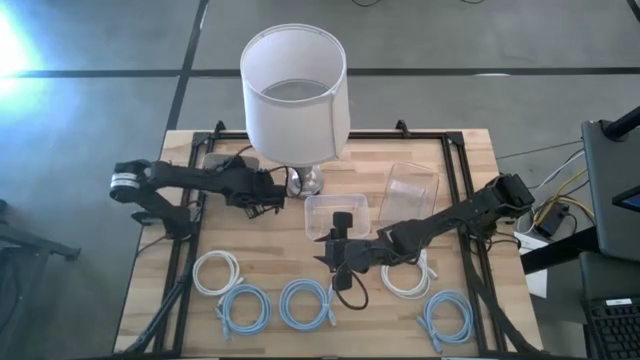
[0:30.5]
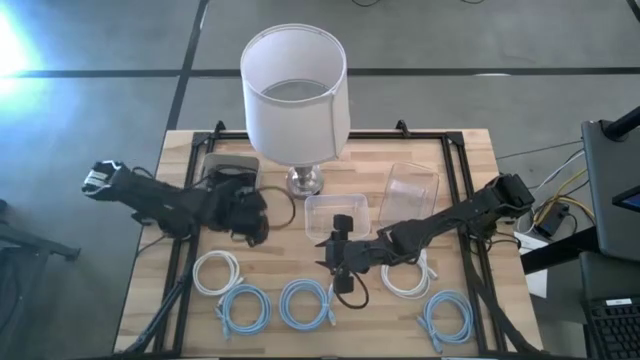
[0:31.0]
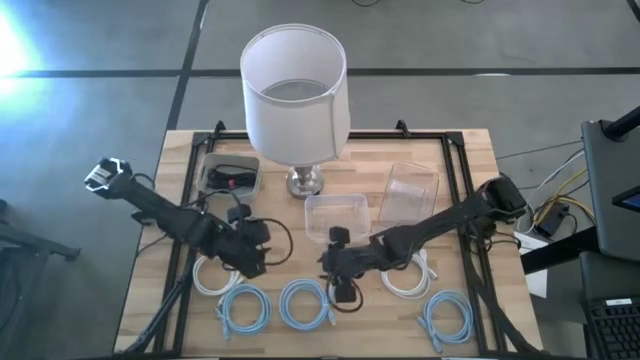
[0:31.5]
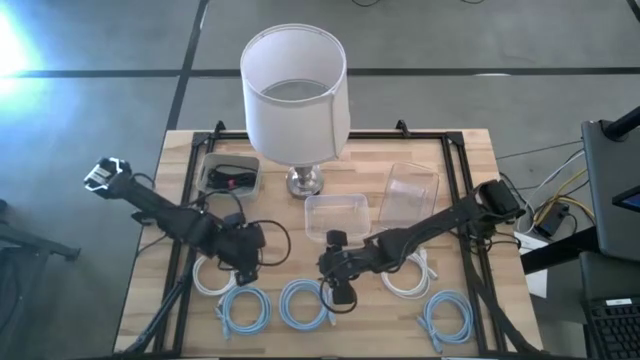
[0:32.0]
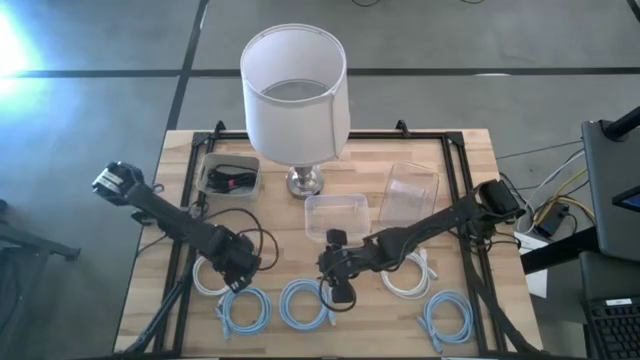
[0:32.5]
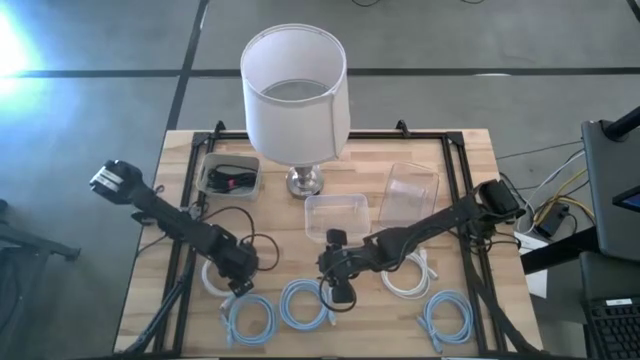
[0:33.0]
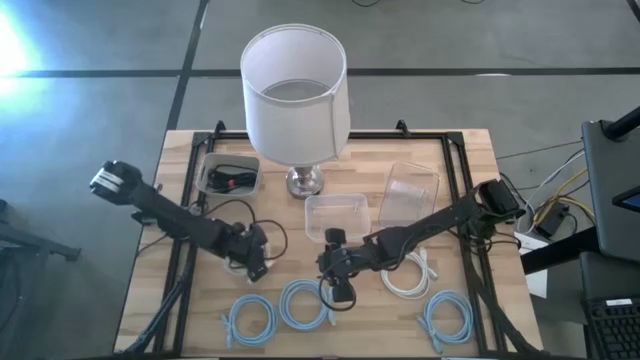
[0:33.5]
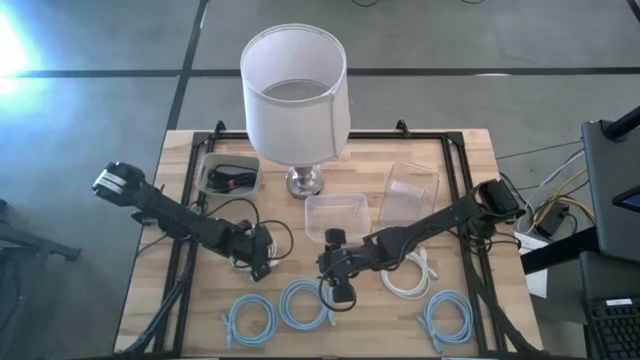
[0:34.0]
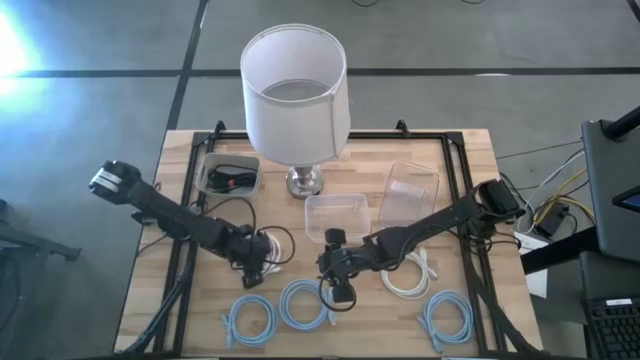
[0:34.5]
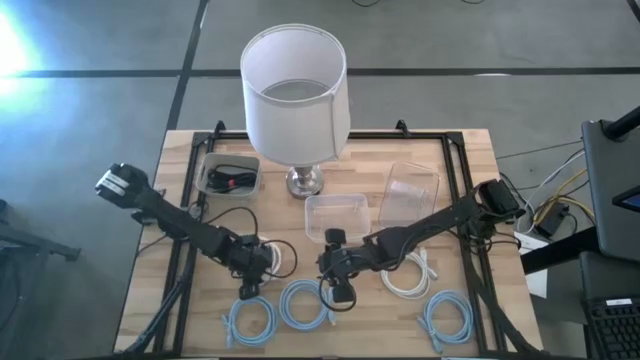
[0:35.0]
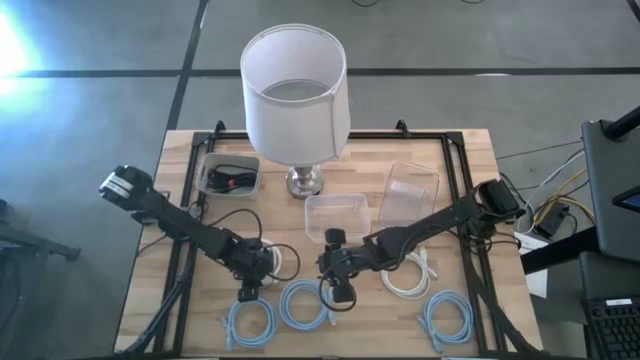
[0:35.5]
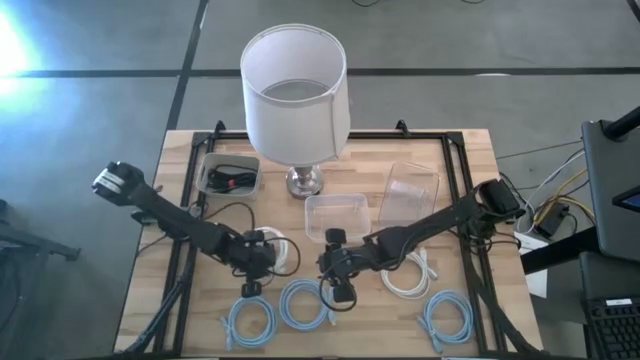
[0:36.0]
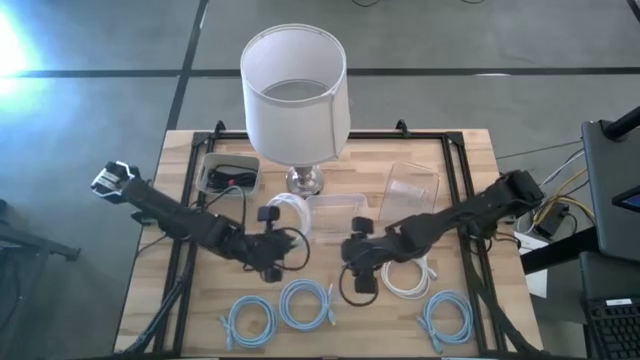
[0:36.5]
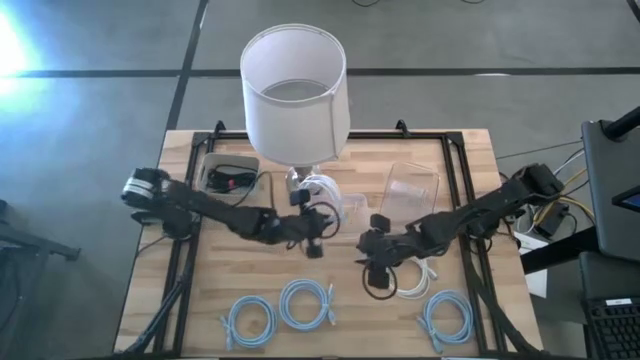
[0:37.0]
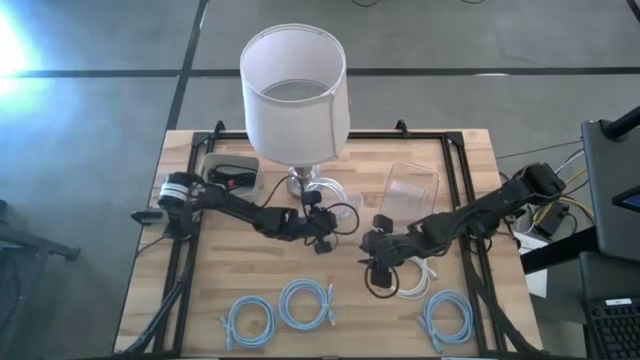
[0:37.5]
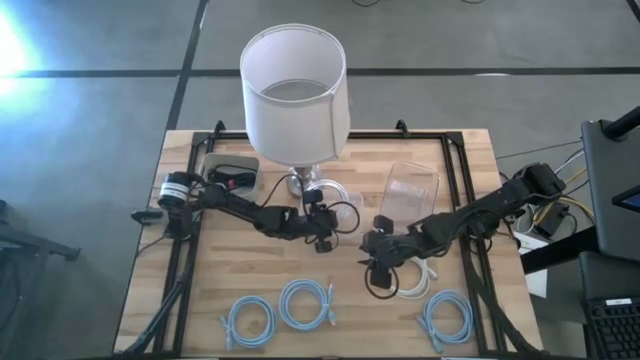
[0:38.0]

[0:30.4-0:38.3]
Task: Pick & Place USB Port
Put the left white USB cable into the left transparent bin

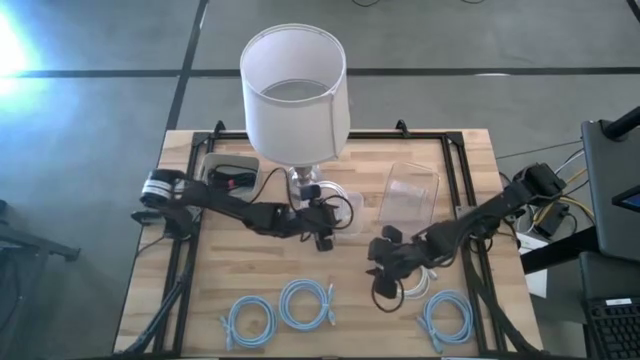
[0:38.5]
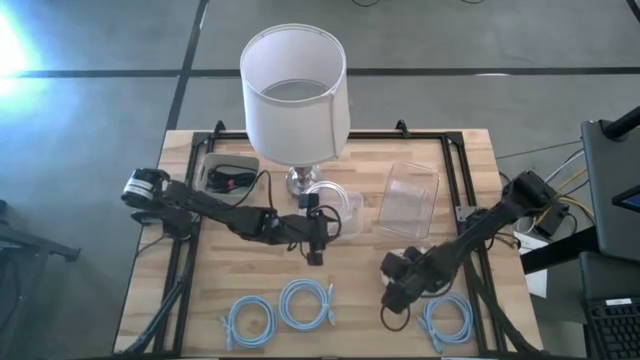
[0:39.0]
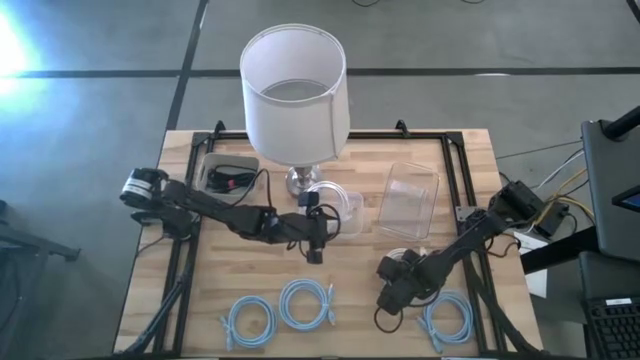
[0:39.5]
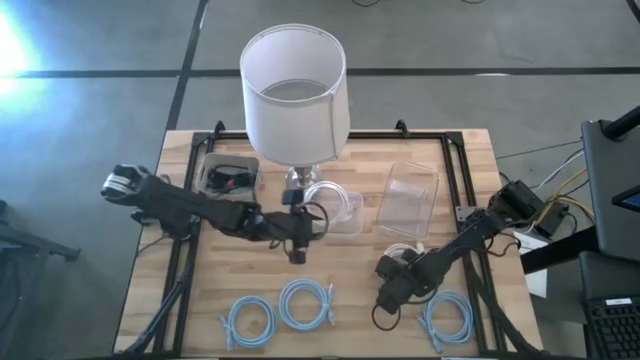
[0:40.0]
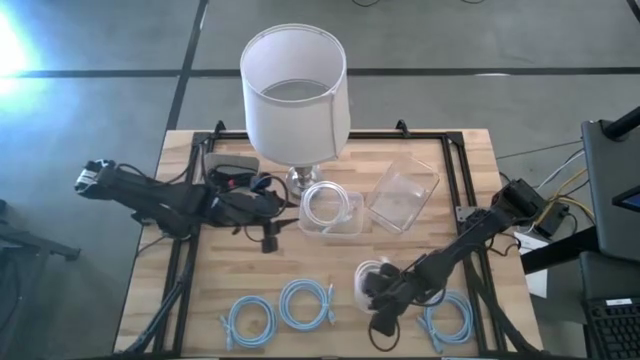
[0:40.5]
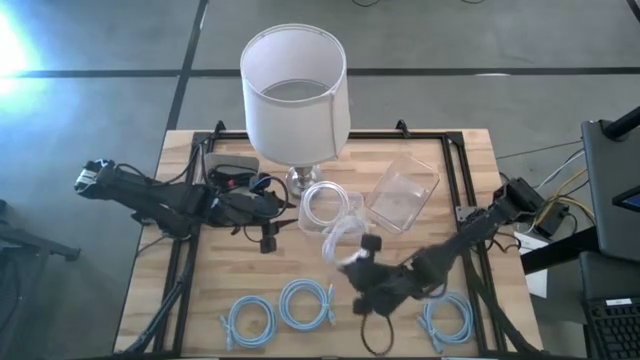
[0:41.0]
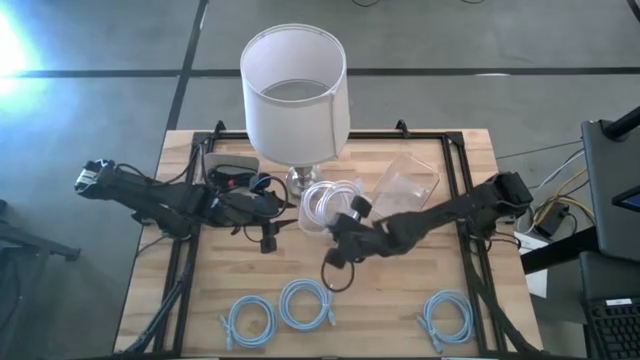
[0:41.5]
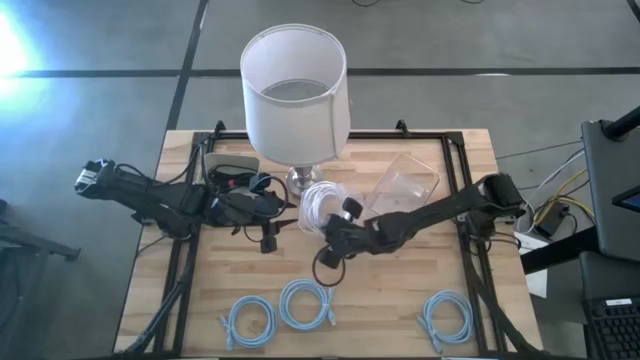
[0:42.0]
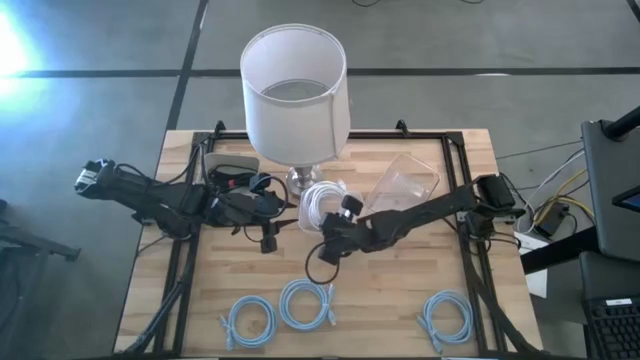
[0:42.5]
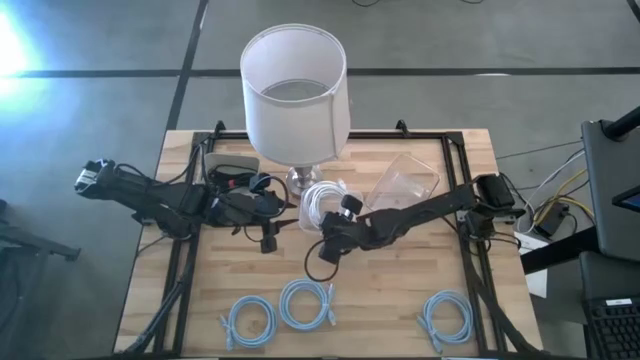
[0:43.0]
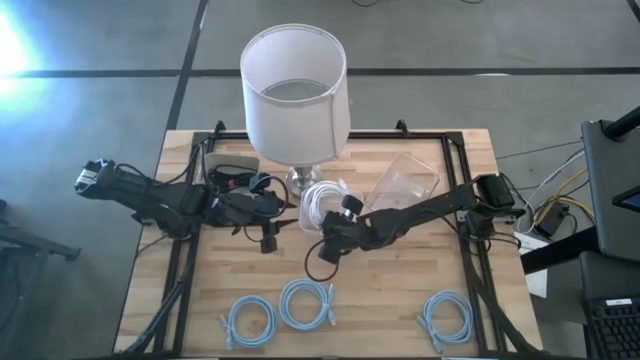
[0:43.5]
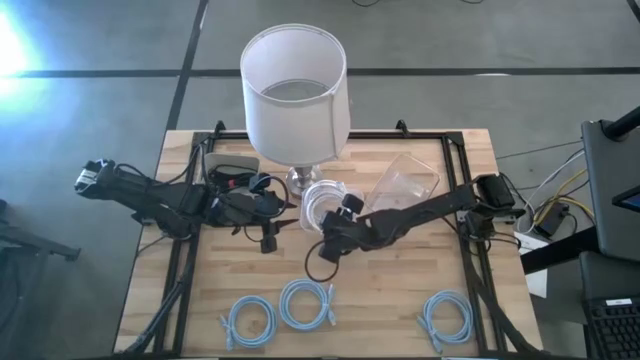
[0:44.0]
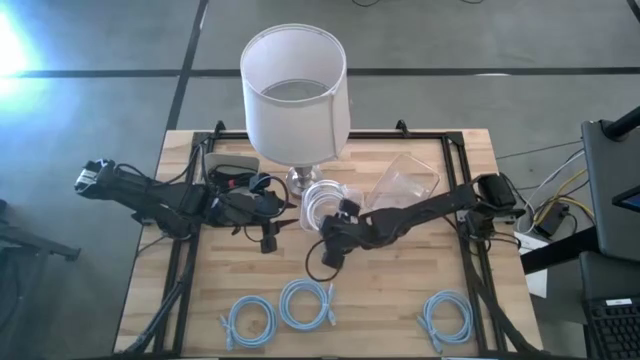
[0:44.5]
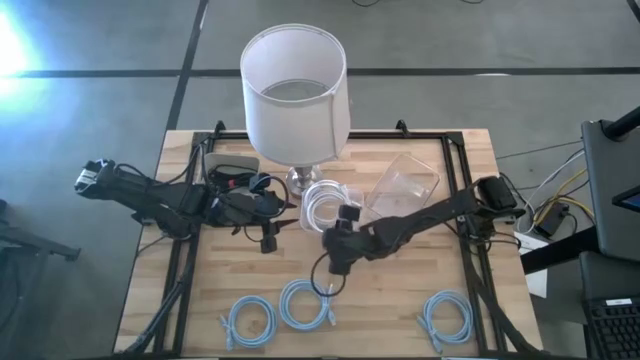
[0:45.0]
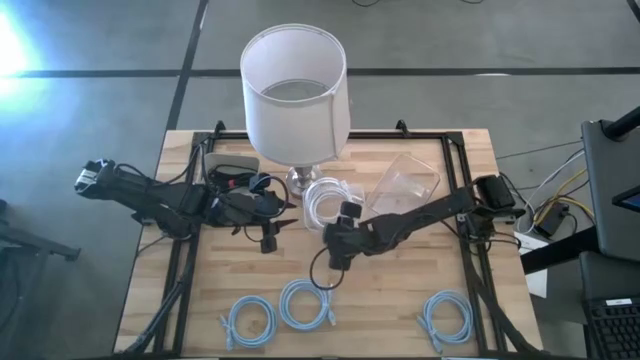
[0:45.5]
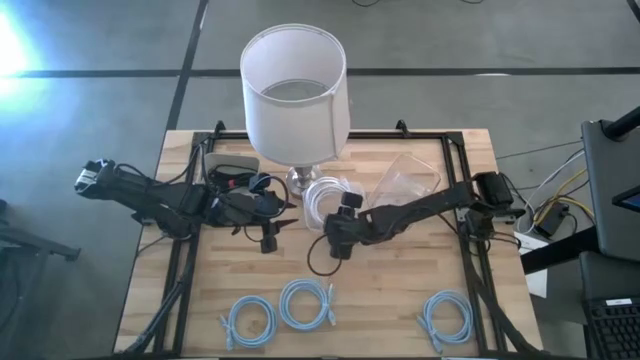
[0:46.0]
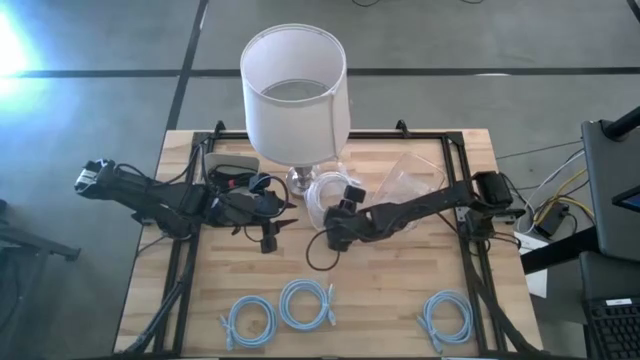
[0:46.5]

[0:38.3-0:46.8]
Put the white USB cable into the left transparent bin

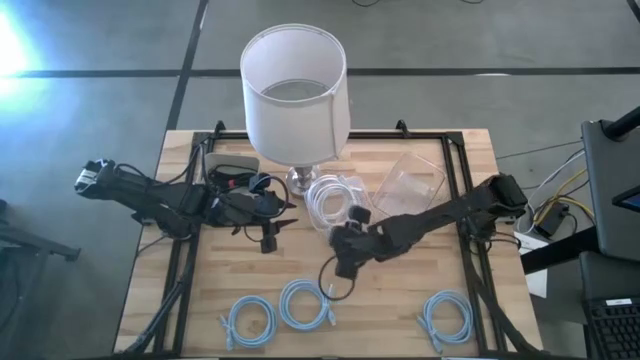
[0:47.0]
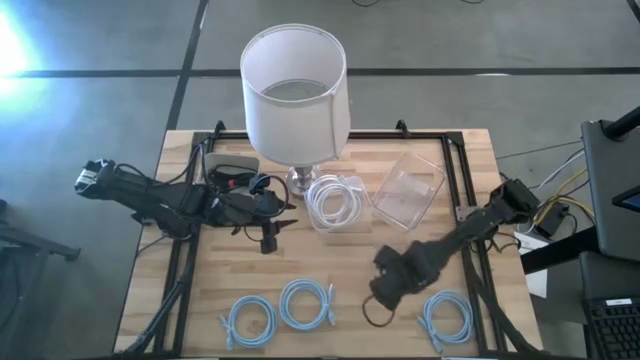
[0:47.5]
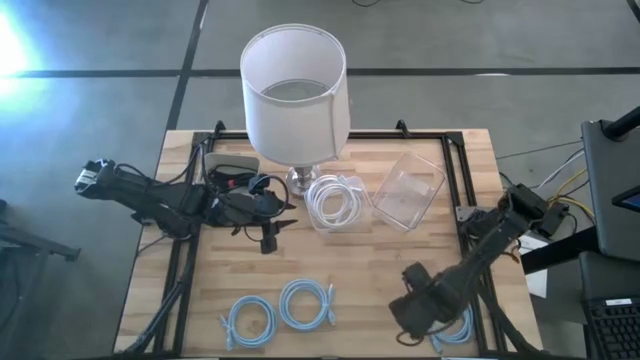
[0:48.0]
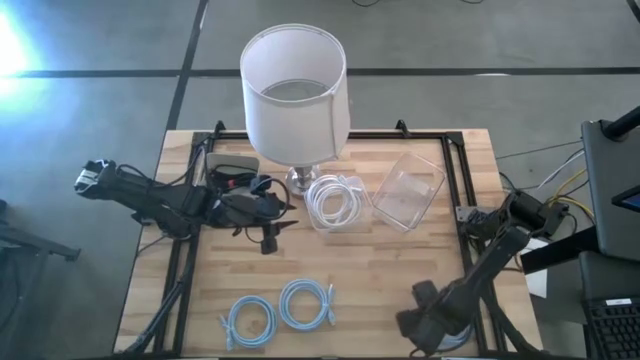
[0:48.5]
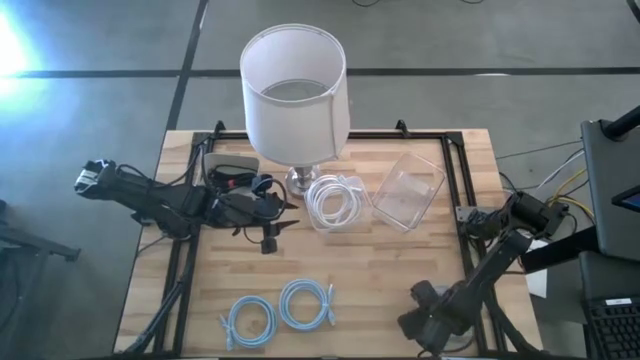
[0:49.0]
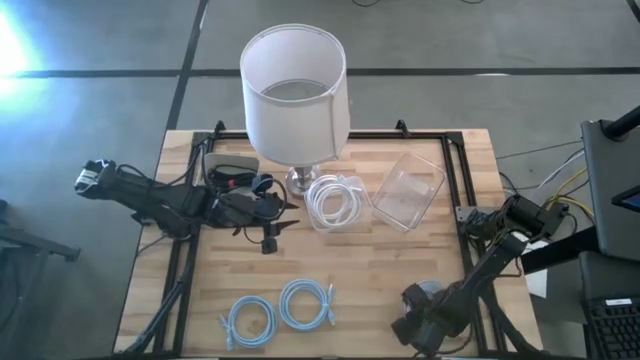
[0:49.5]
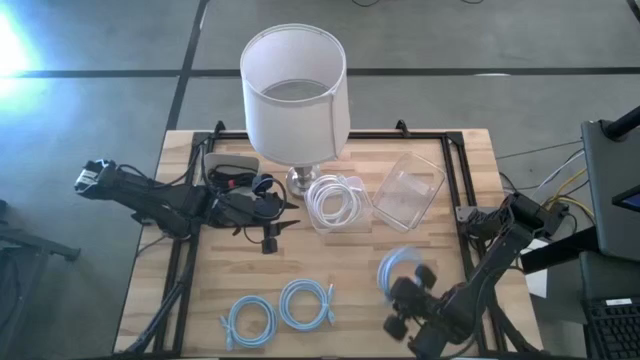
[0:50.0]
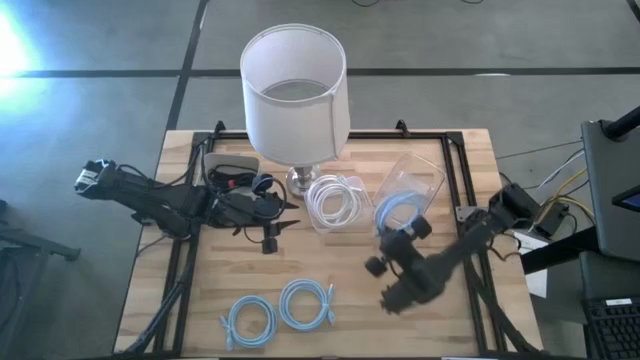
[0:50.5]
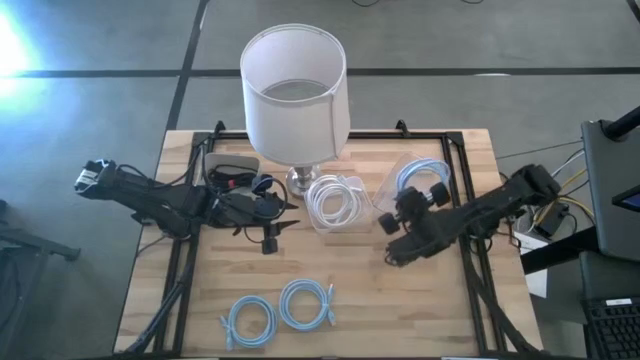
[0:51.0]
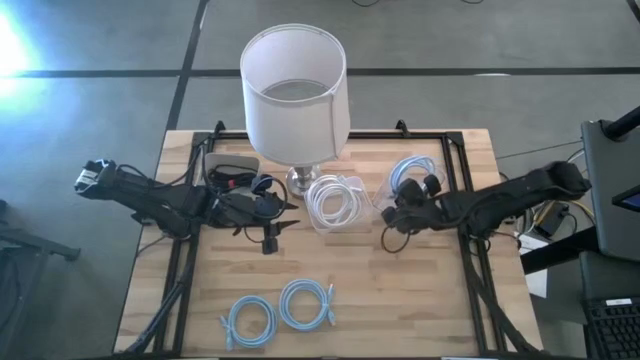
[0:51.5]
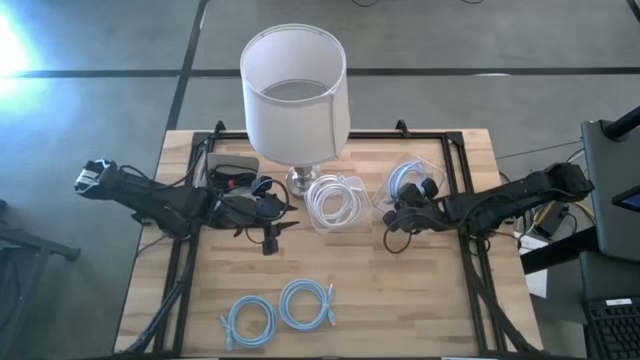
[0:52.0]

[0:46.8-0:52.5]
Put the right light blue USB cable into the right transparent bin
